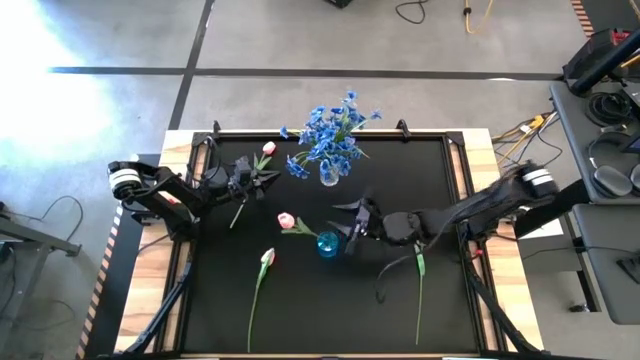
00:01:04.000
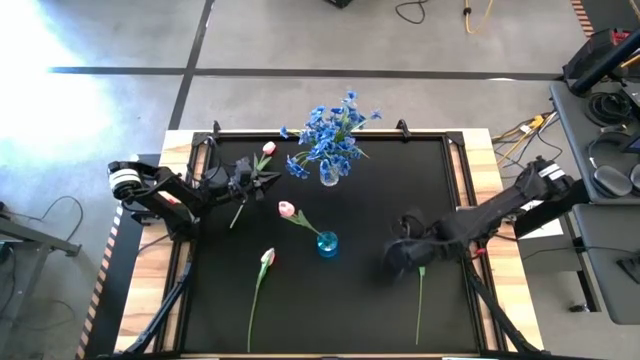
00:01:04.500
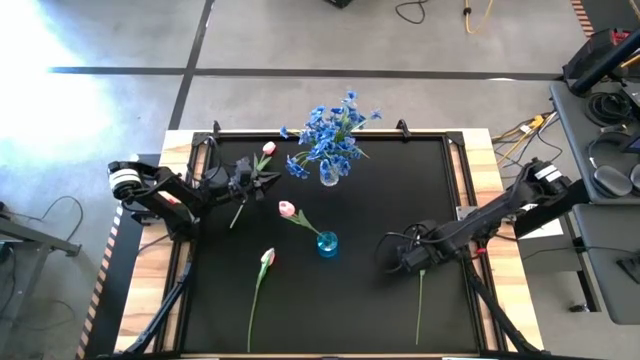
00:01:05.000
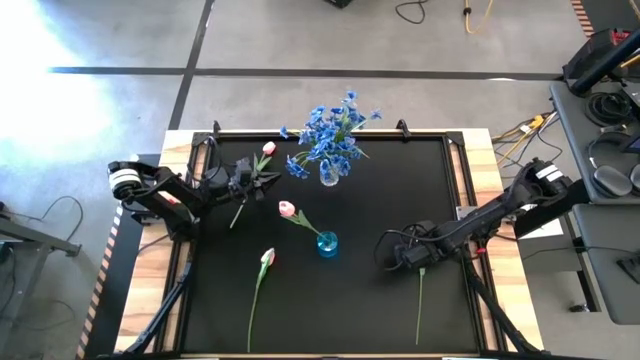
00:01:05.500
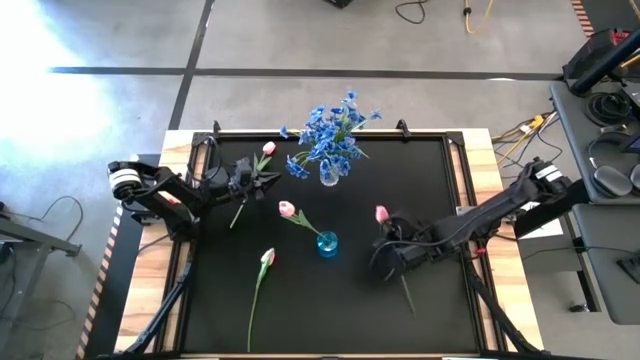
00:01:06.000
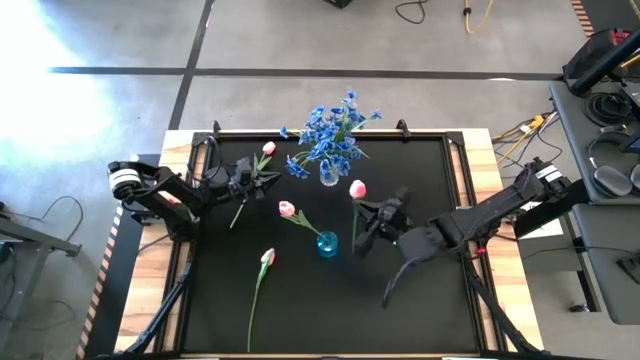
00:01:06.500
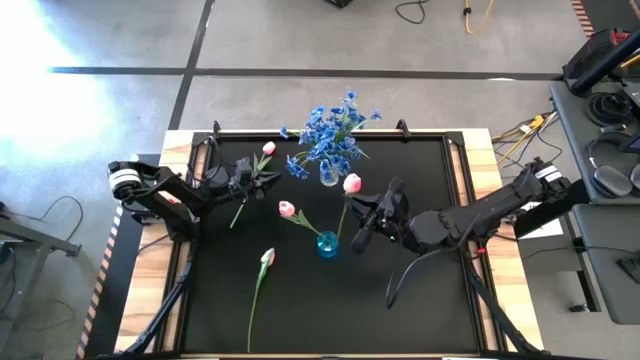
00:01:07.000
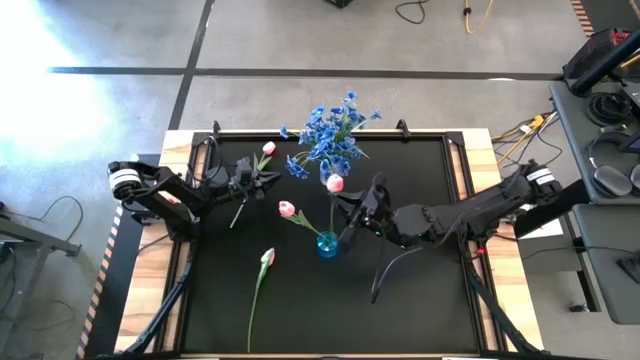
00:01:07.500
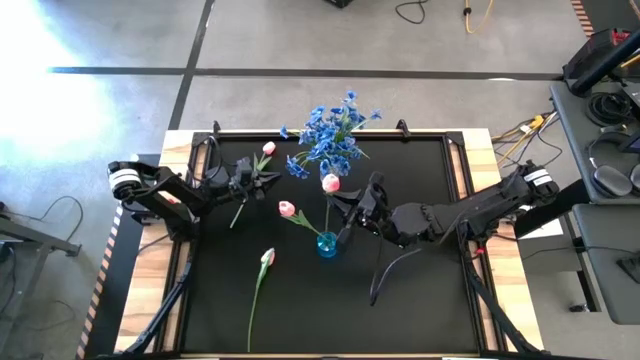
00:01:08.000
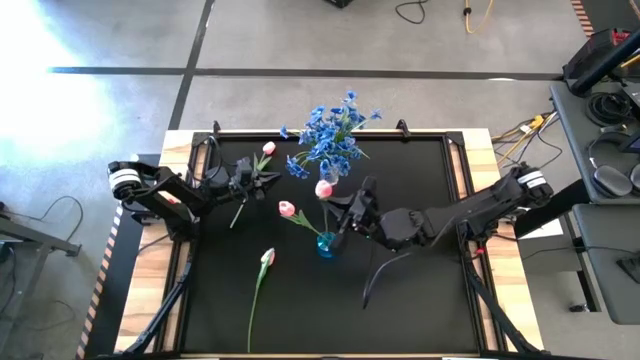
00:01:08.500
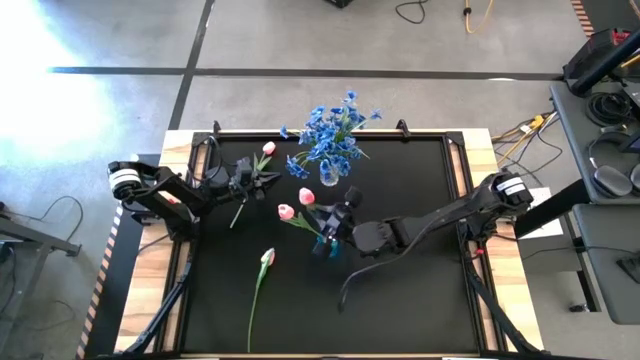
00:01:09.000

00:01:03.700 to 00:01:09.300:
Task: Sort flowers into vase by color
Put the bottom right pink tulip into the blue vase

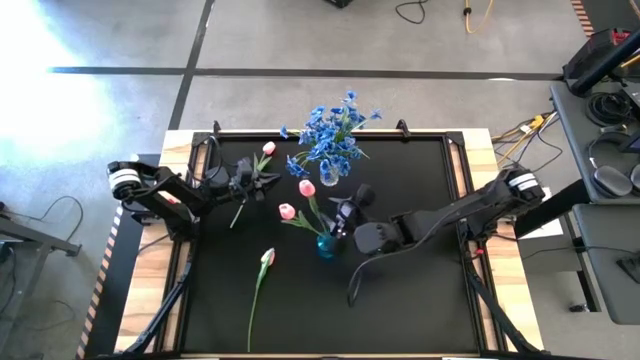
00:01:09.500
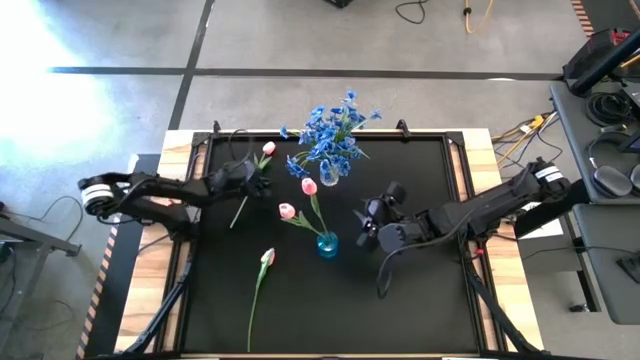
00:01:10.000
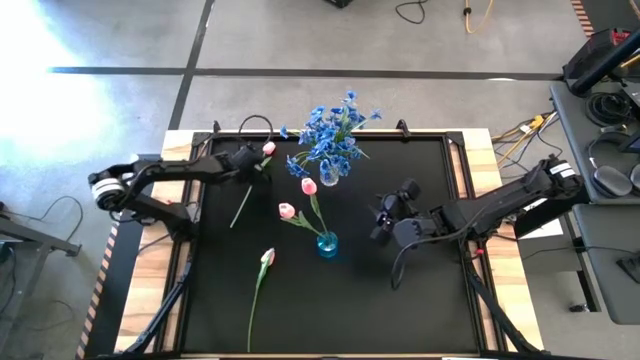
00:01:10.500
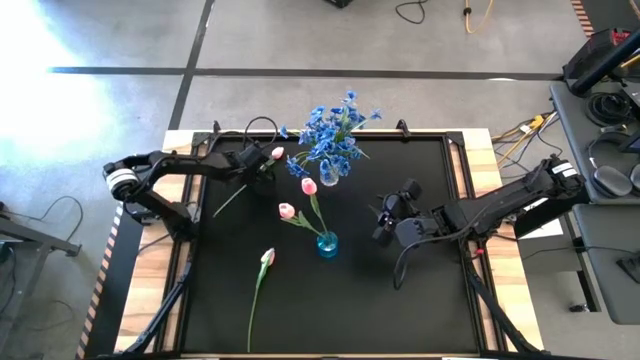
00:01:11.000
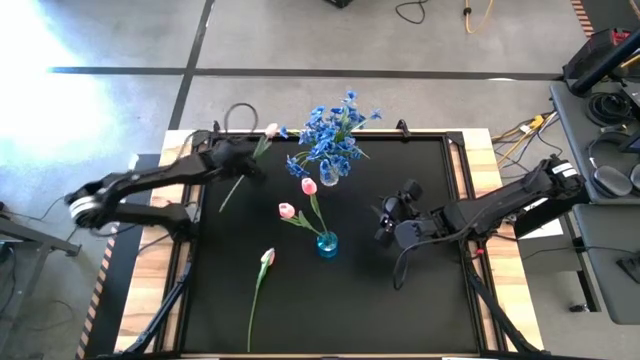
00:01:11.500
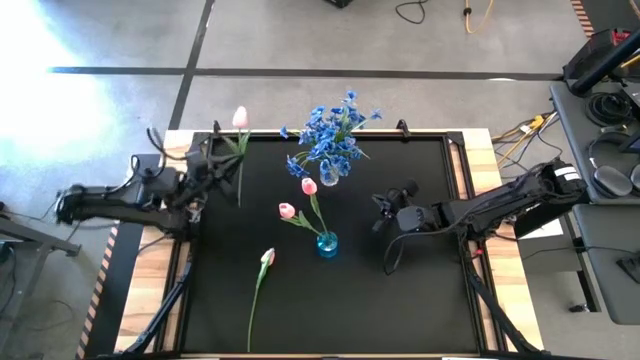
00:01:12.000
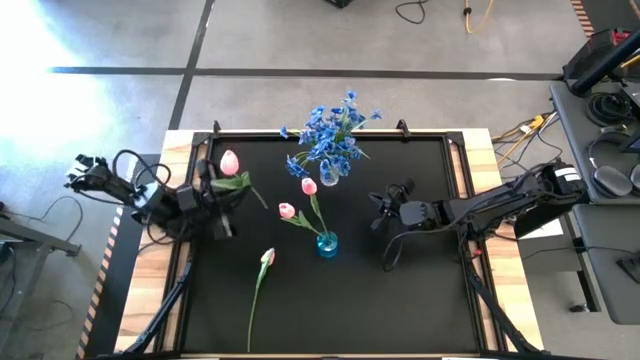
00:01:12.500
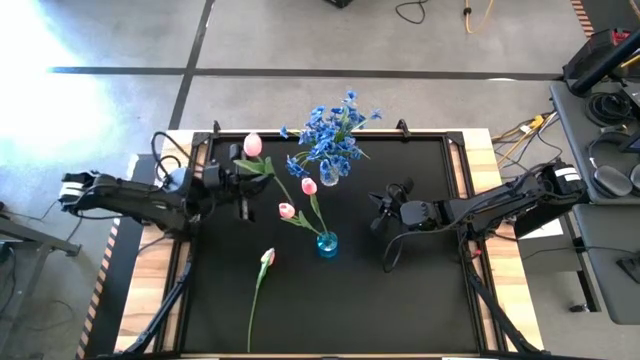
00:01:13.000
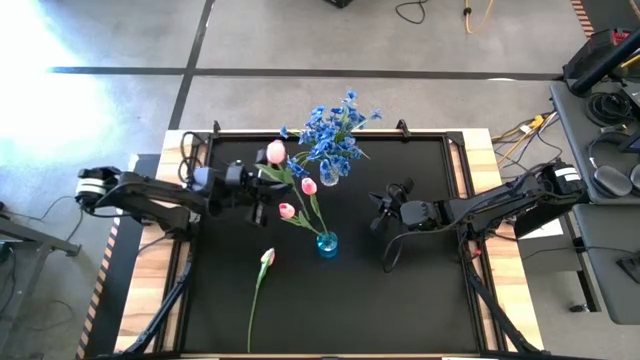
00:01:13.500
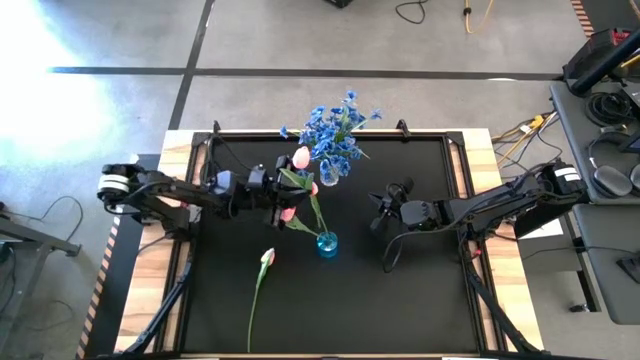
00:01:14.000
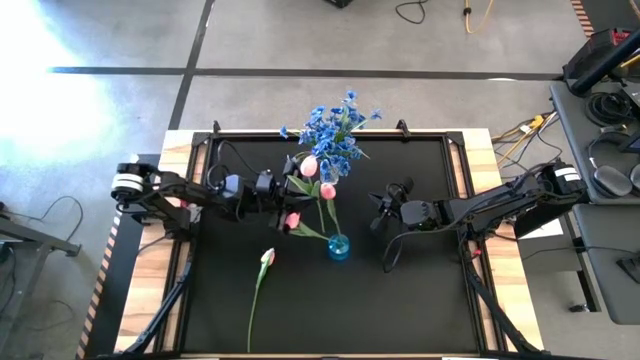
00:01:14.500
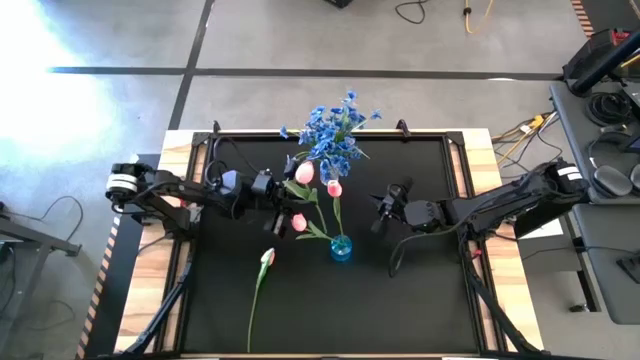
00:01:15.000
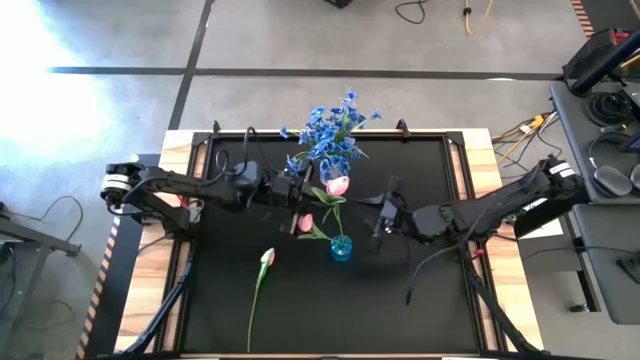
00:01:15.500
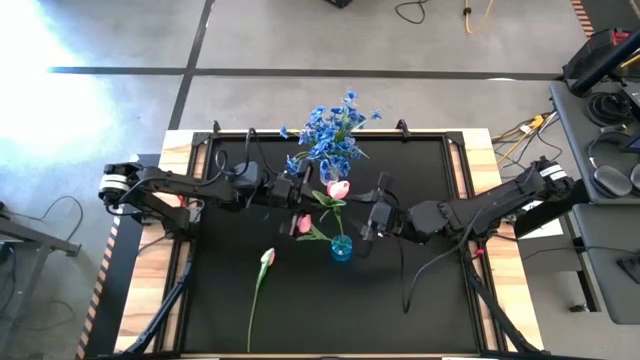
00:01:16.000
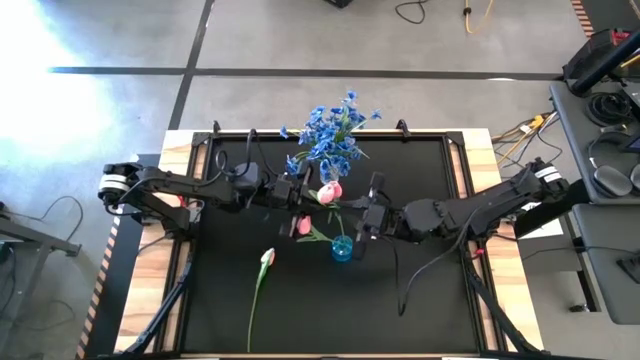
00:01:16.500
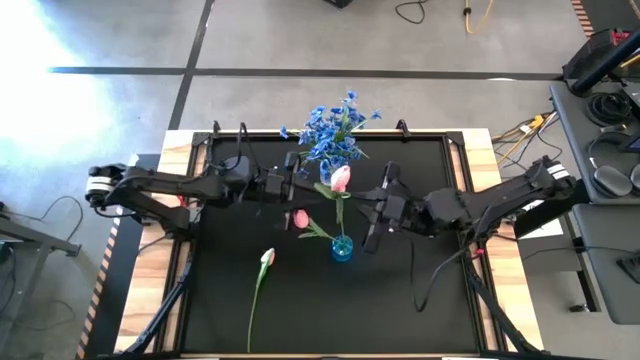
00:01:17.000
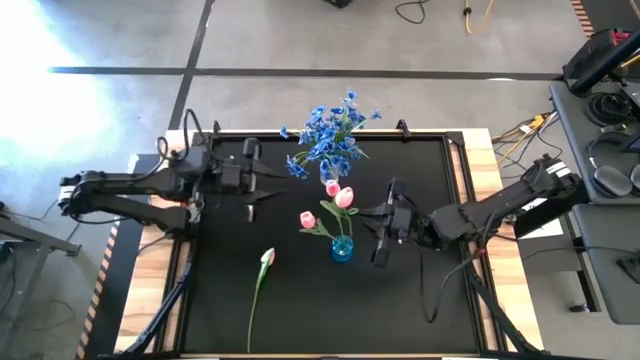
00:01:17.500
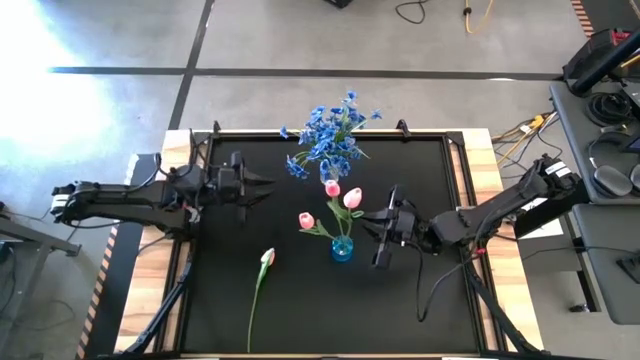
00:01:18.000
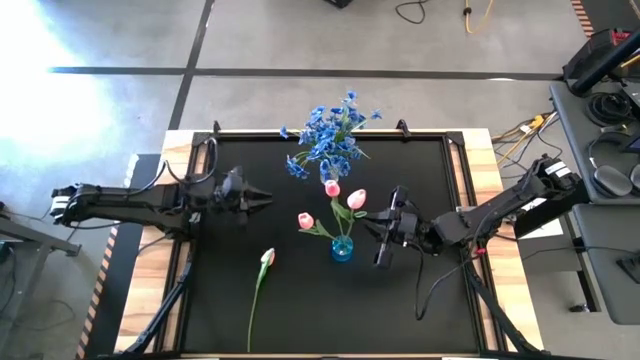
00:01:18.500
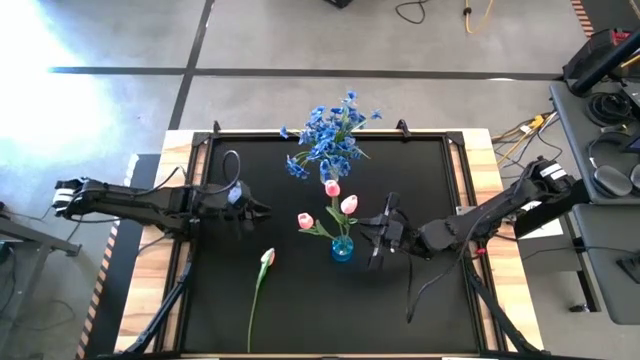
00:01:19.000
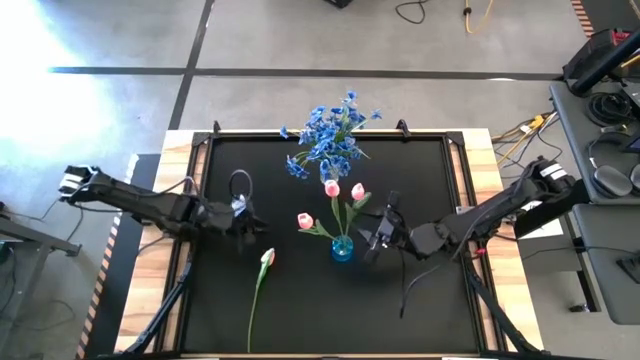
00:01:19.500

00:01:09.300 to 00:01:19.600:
Put the top pink tulip into the blue vase

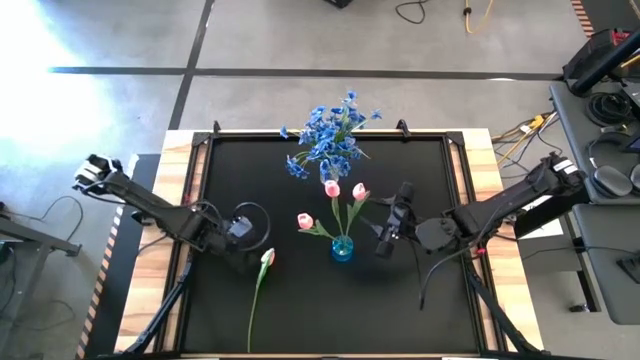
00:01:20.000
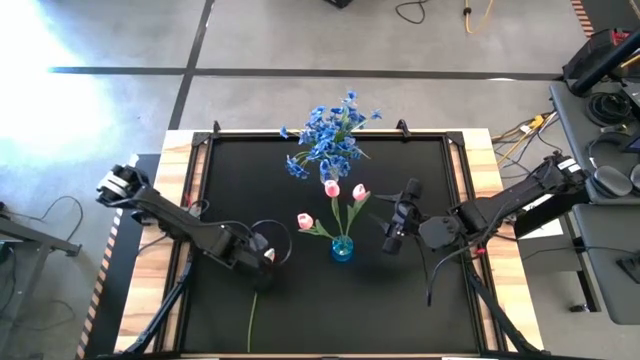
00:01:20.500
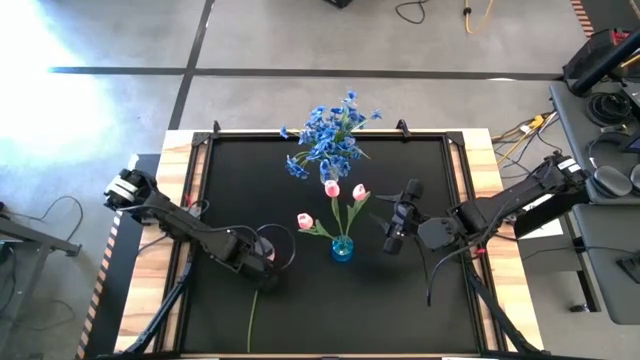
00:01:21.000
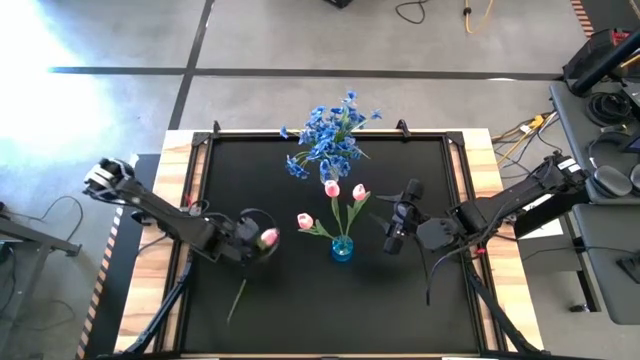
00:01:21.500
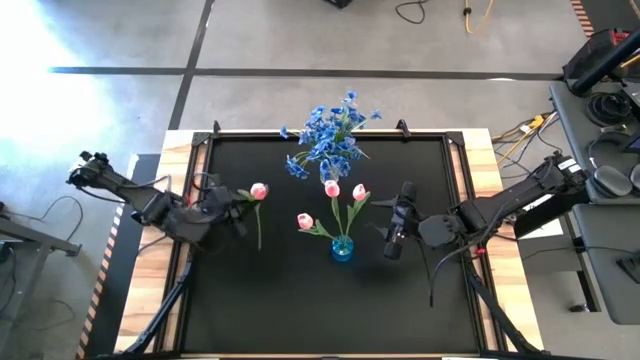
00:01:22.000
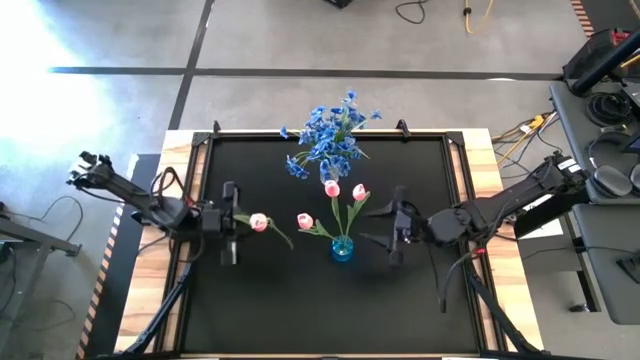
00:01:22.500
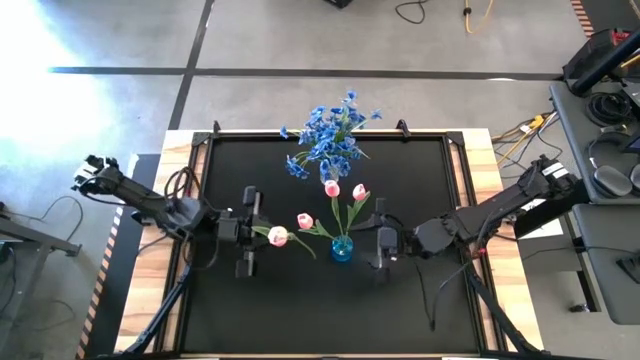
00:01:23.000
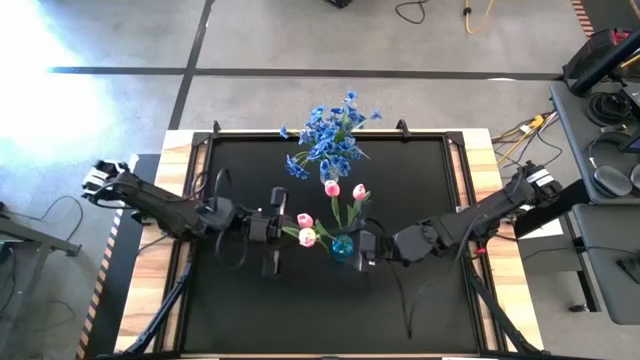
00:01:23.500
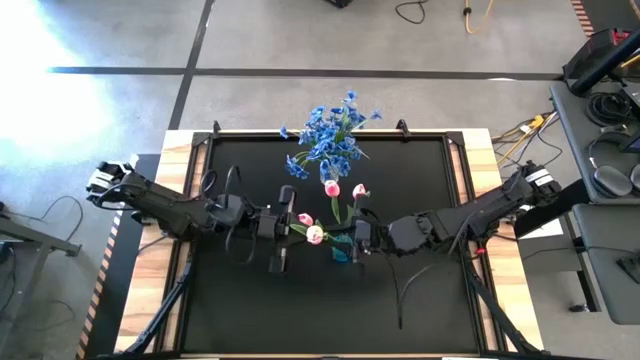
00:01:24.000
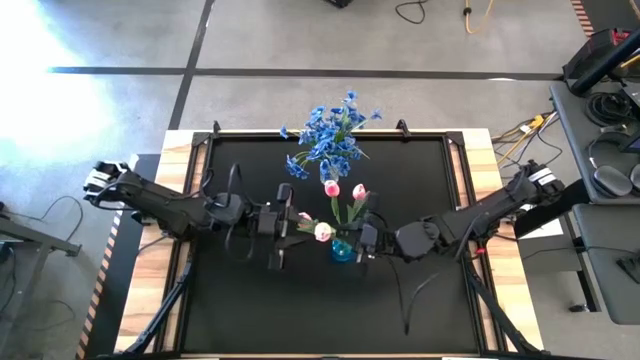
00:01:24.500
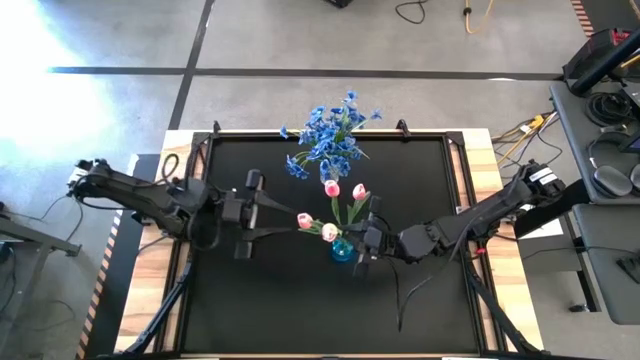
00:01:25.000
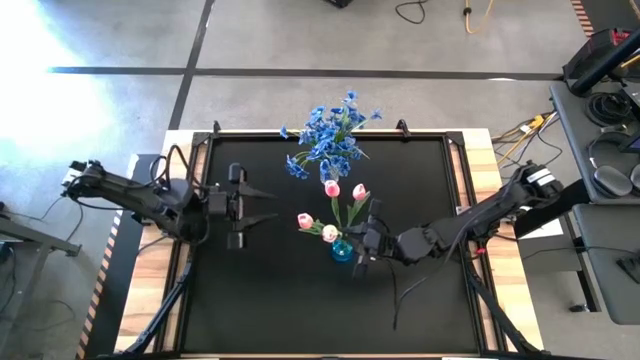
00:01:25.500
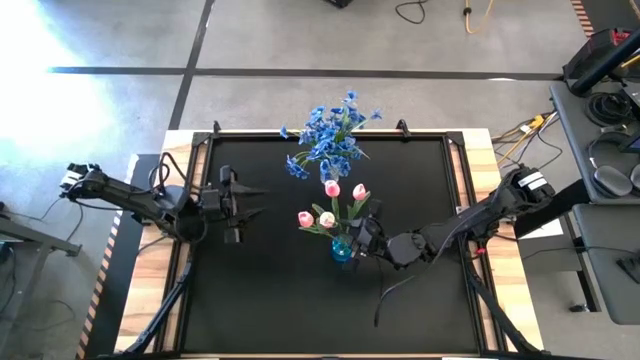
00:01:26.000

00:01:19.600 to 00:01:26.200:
Put the pink tulip into the blue vase
